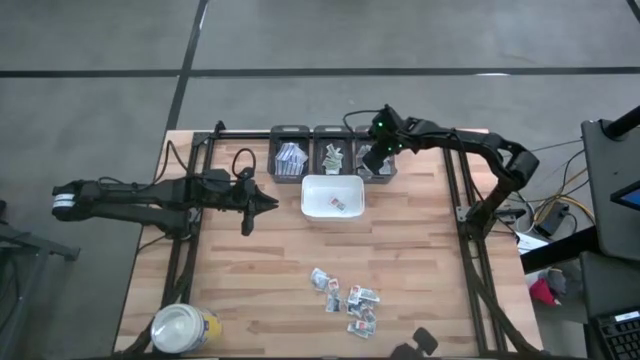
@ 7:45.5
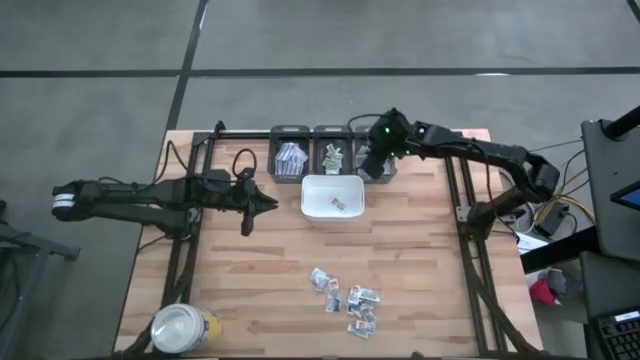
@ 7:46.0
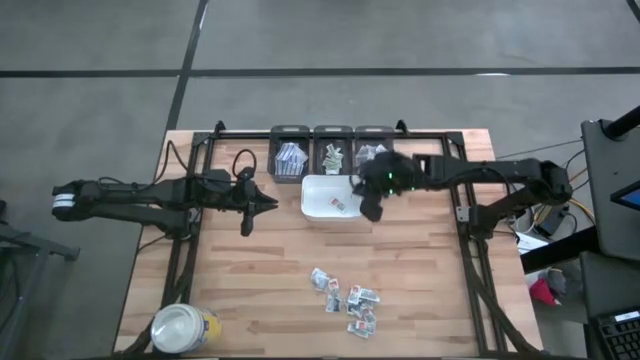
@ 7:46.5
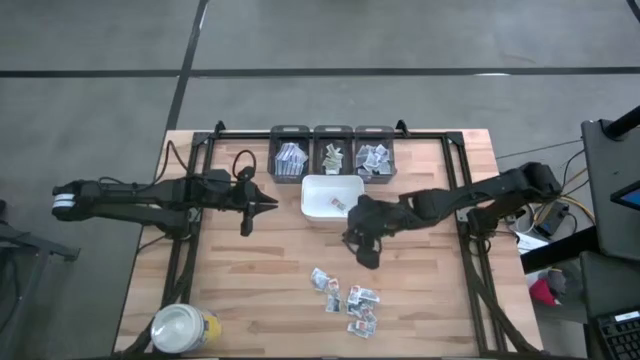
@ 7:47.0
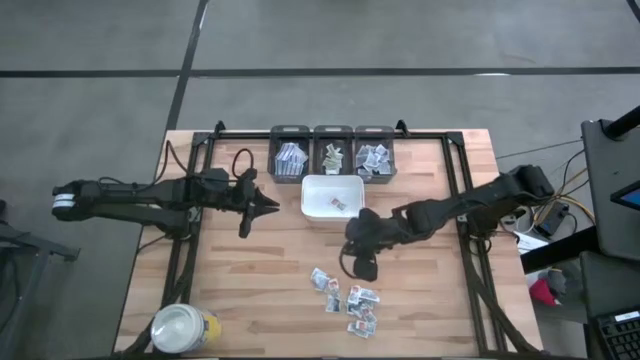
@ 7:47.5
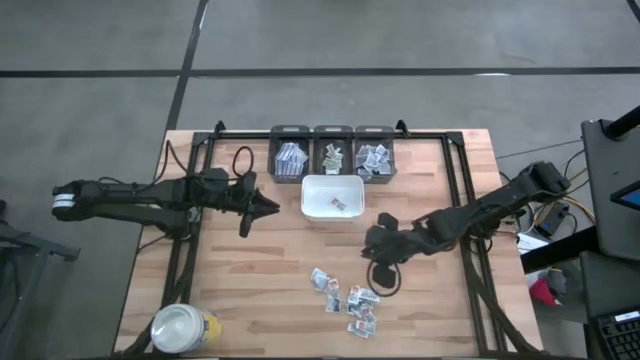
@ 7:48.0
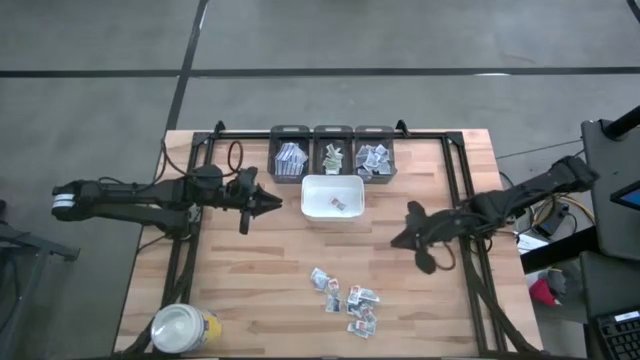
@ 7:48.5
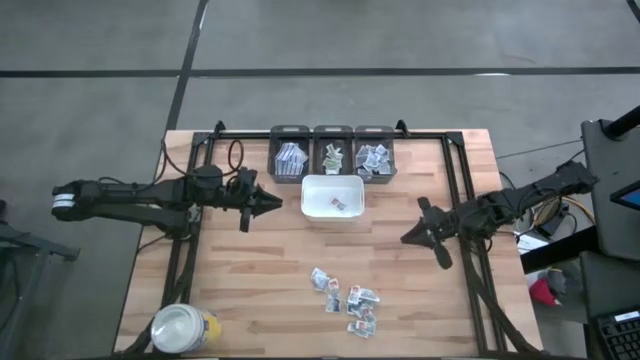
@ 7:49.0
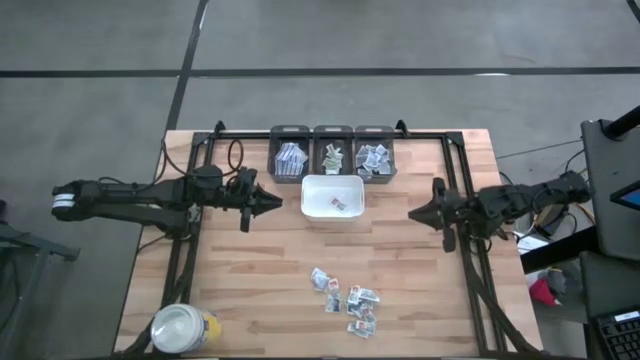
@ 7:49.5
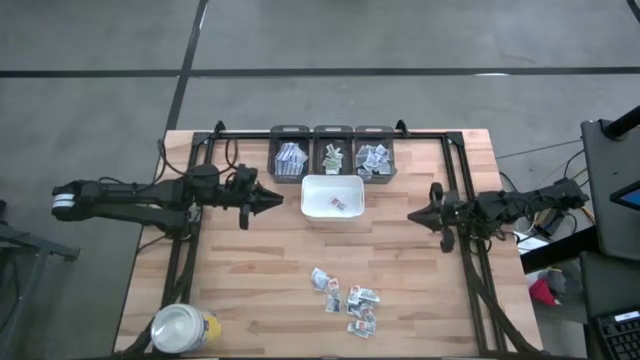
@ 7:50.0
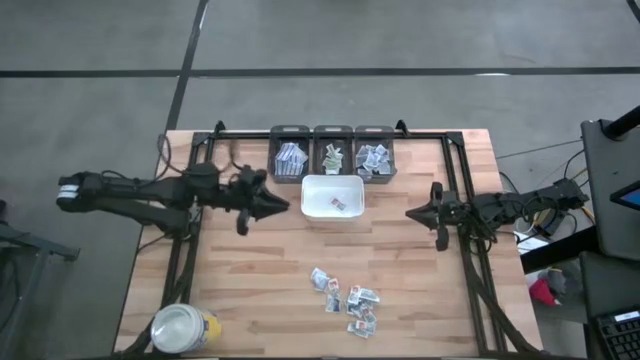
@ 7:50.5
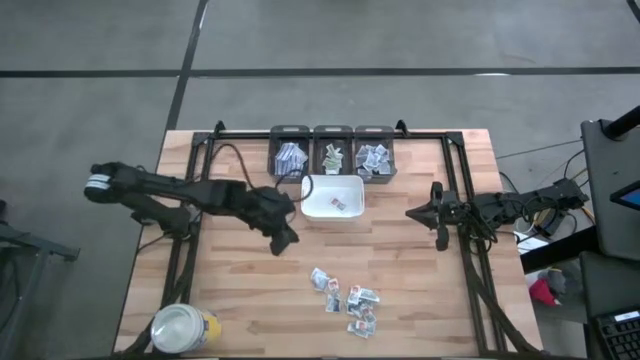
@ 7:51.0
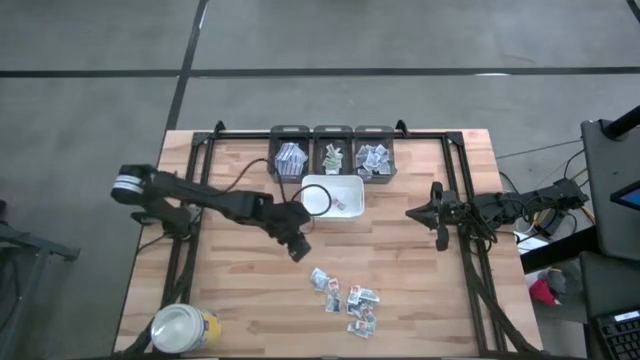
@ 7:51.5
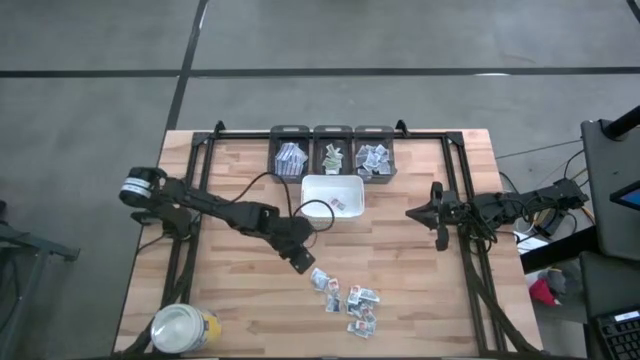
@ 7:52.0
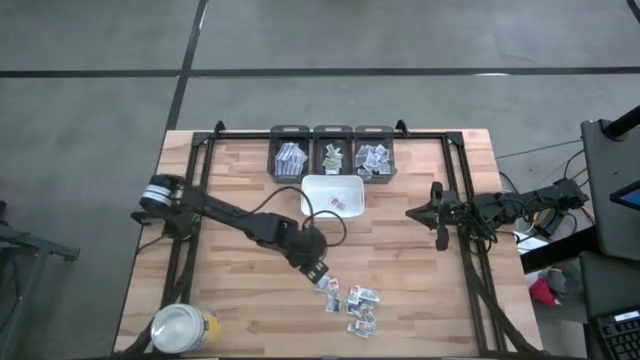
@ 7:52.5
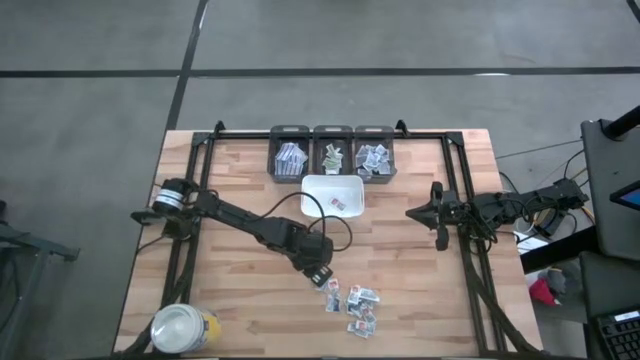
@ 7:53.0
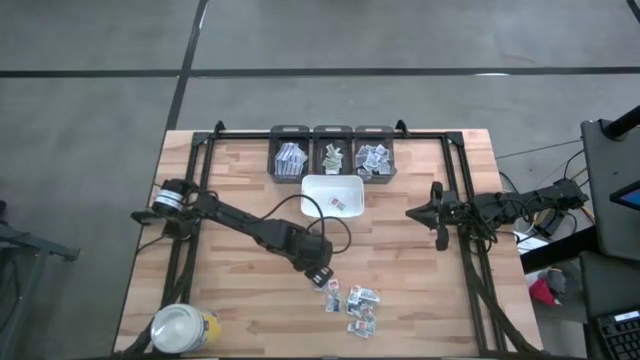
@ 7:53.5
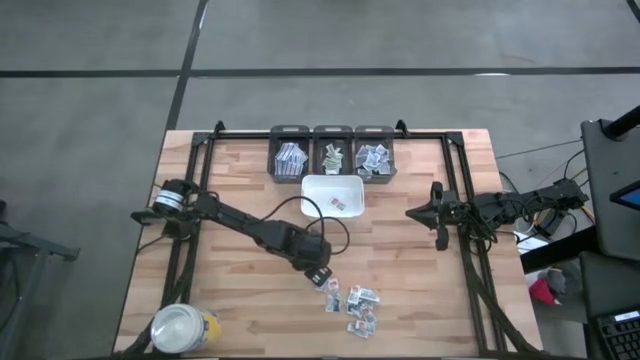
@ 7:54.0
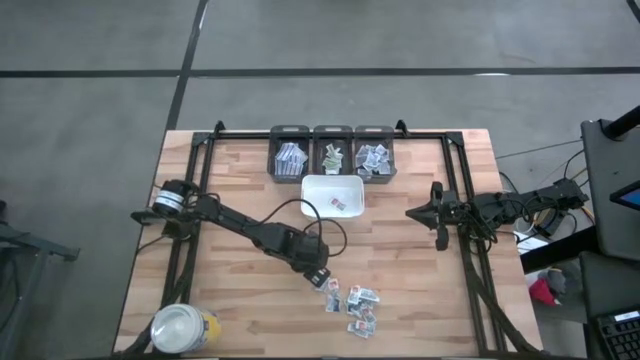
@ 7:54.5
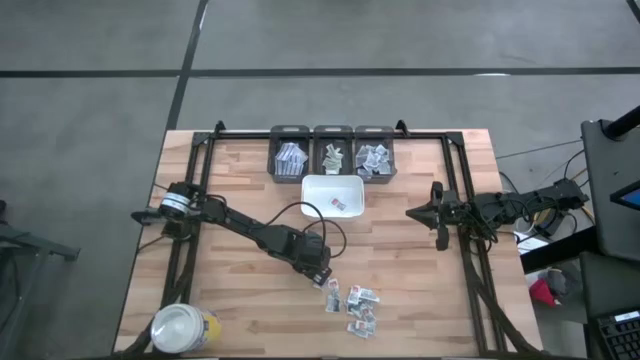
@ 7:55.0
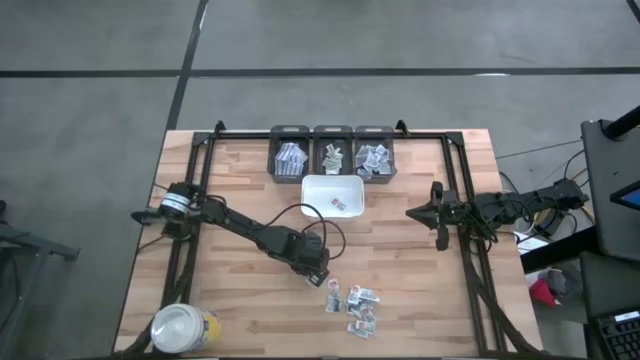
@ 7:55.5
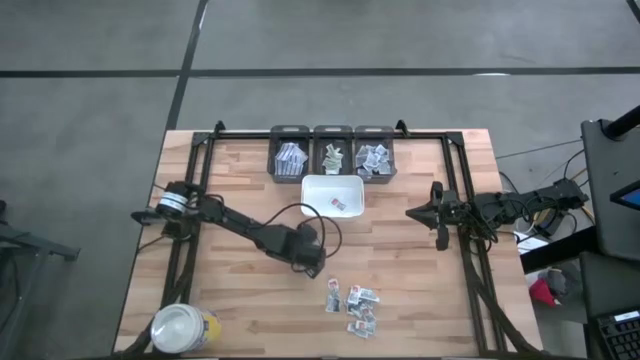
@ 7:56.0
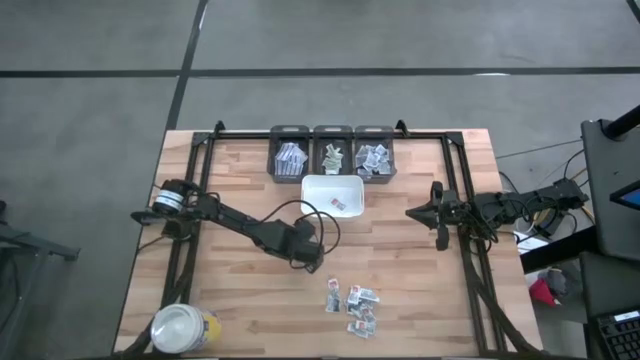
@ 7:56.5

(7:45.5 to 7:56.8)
Task: Pick & Place First Aid Supplies
Put the white alcohol pad into the right black bin

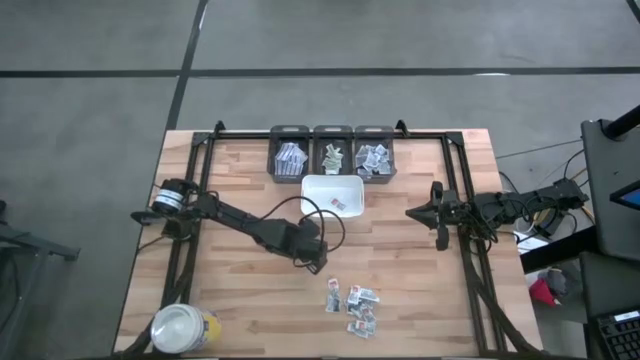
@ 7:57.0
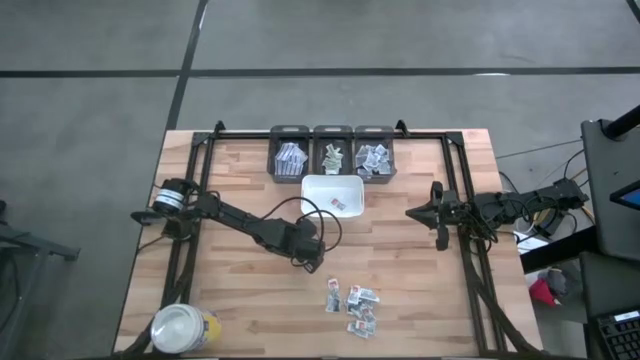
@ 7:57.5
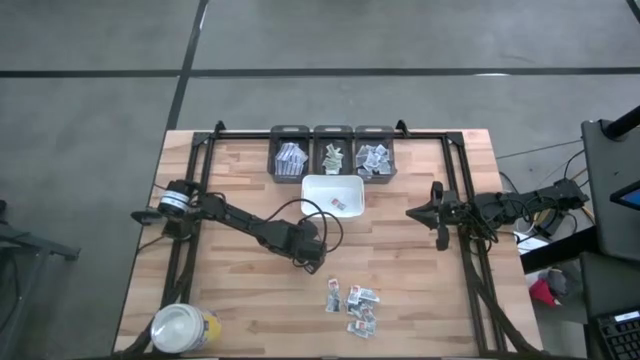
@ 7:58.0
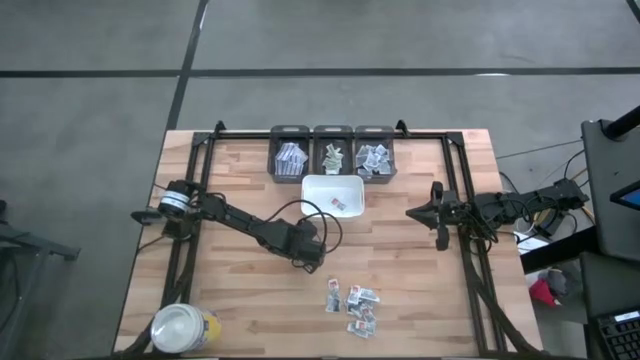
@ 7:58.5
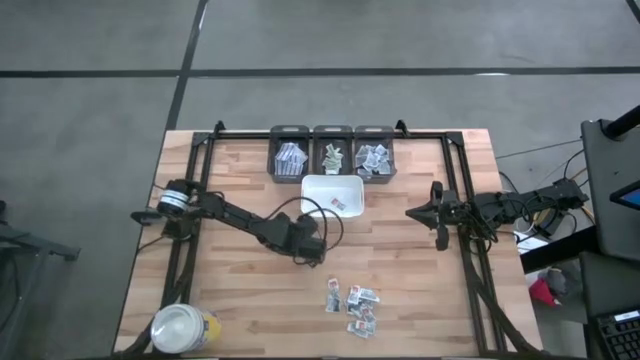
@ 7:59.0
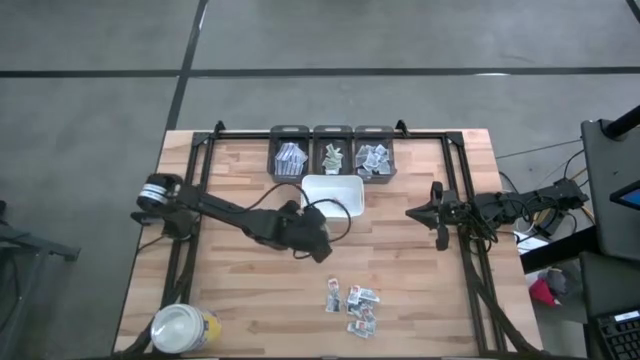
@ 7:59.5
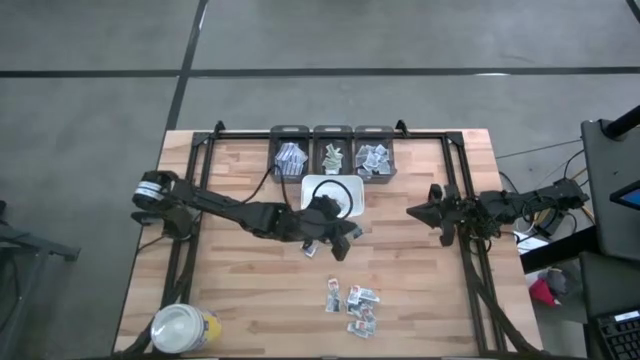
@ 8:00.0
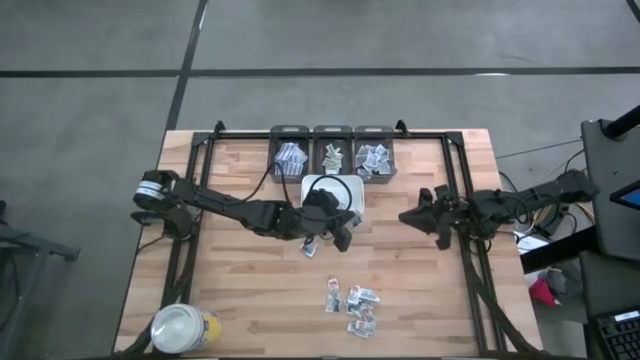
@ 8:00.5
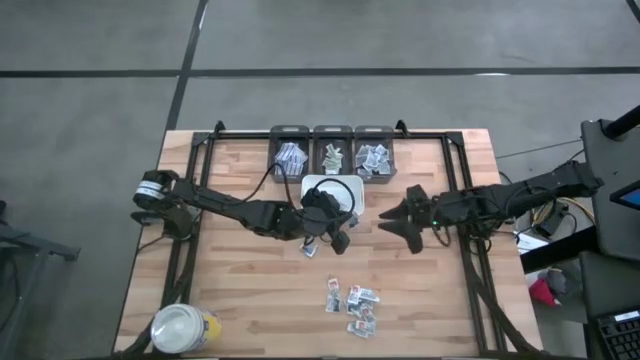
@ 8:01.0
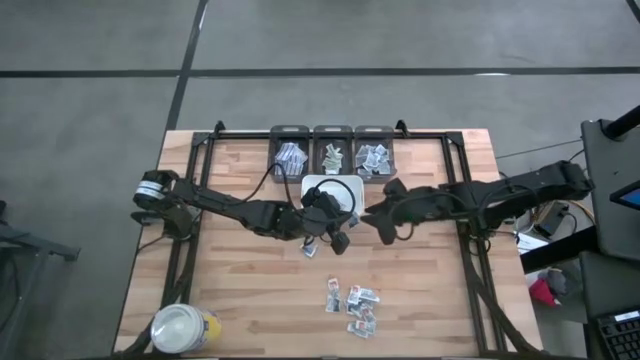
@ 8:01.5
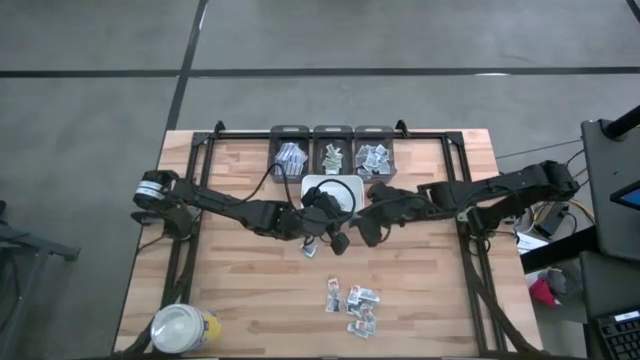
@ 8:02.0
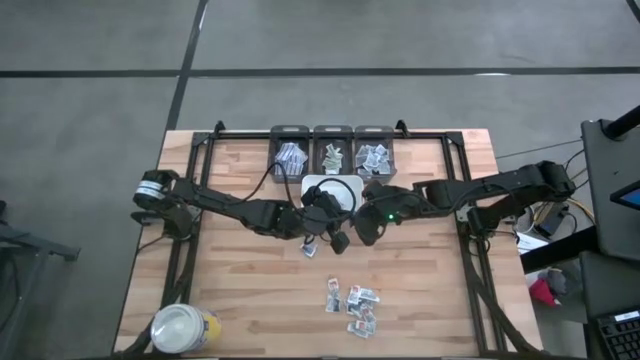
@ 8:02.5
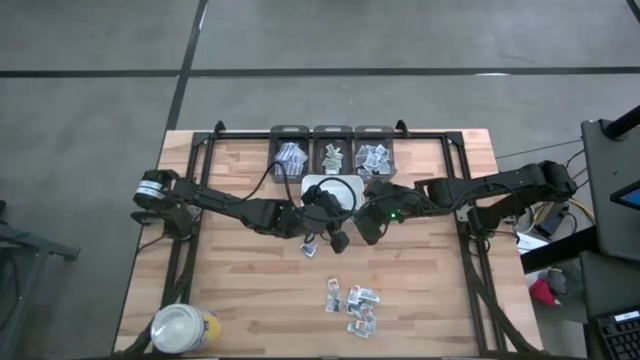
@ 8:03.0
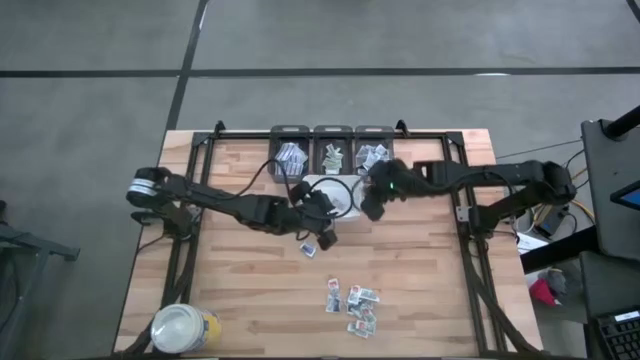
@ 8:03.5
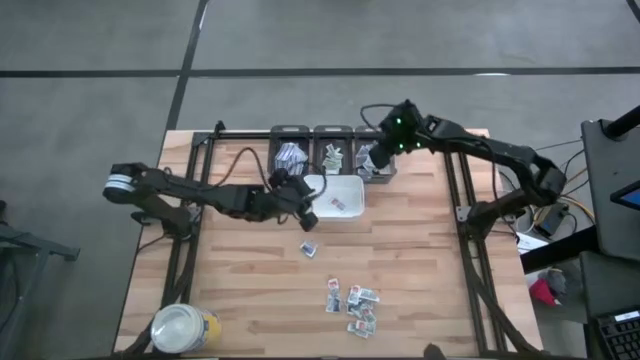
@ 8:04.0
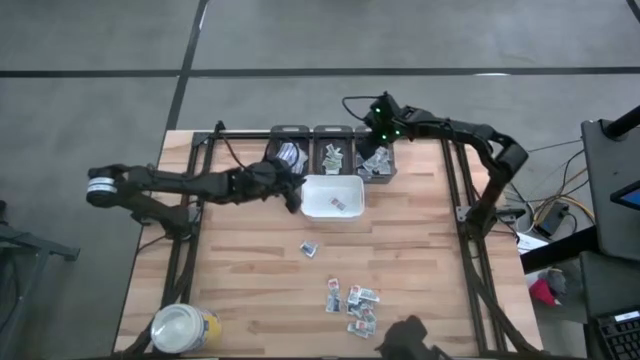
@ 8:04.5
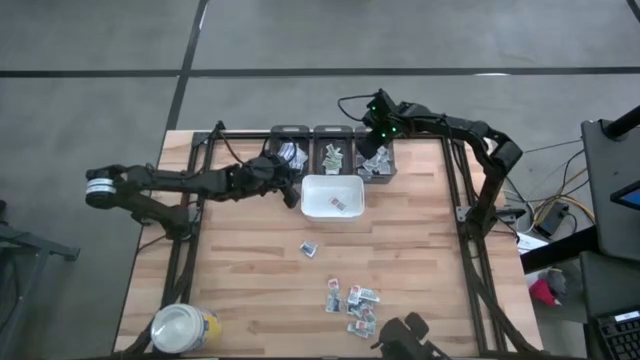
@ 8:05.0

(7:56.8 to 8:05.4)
Put the white alcohol pad into the right black bin
